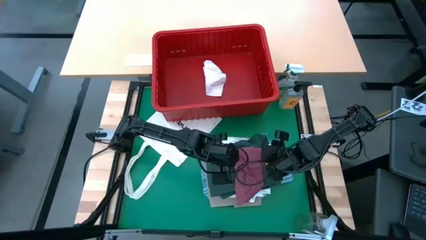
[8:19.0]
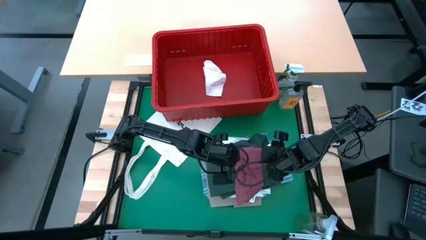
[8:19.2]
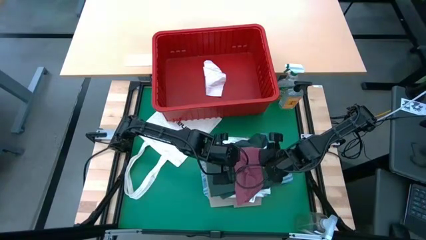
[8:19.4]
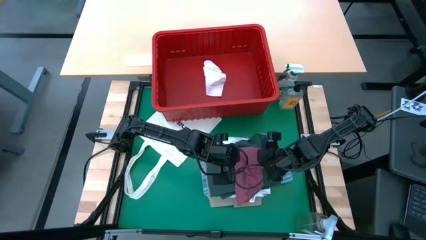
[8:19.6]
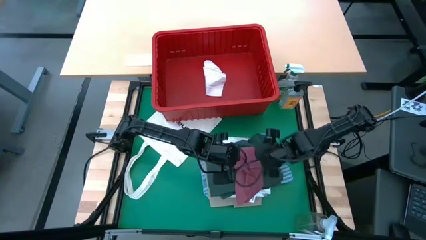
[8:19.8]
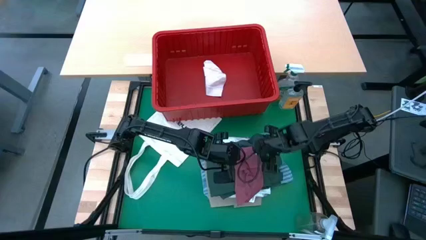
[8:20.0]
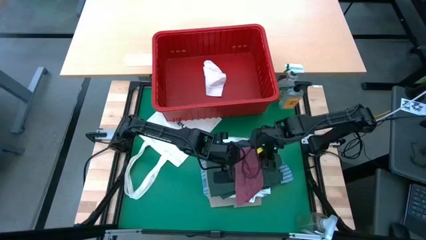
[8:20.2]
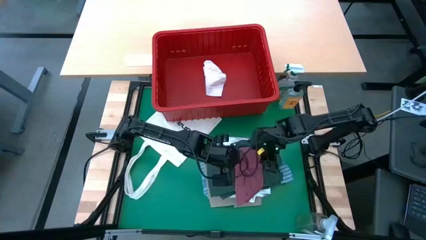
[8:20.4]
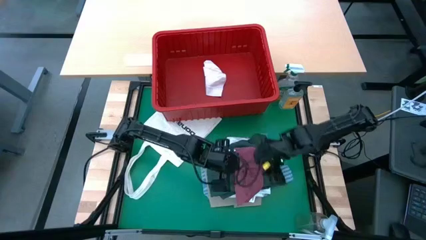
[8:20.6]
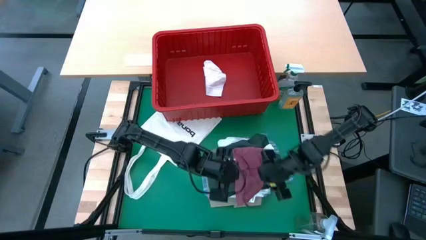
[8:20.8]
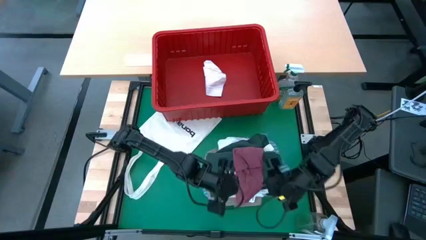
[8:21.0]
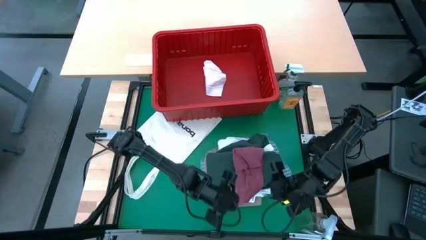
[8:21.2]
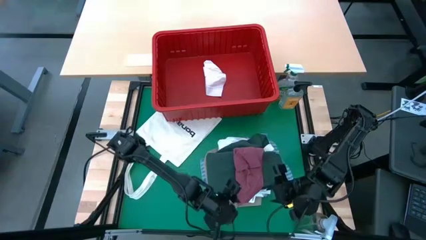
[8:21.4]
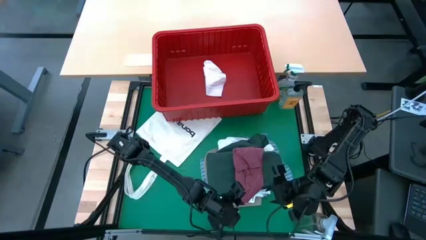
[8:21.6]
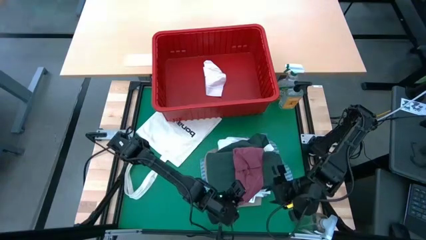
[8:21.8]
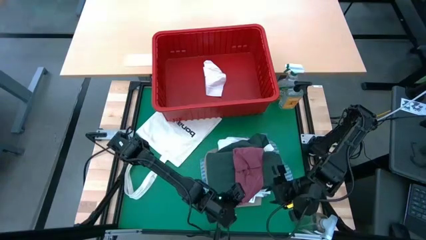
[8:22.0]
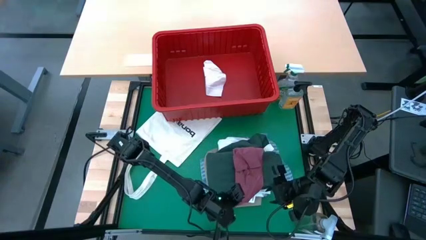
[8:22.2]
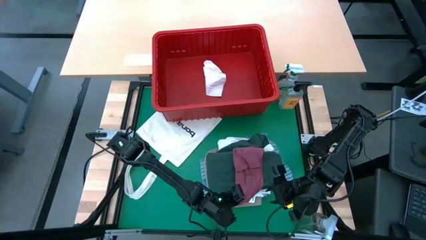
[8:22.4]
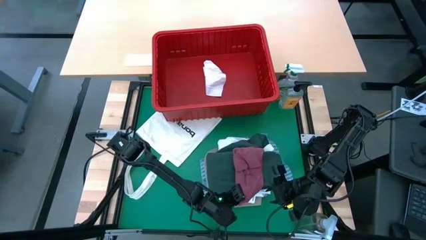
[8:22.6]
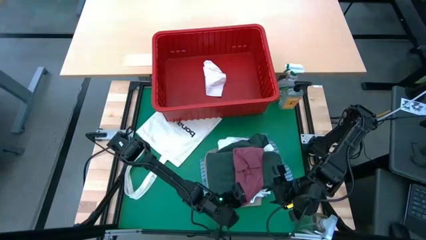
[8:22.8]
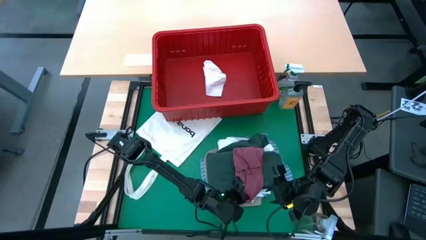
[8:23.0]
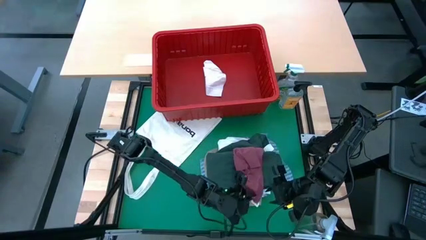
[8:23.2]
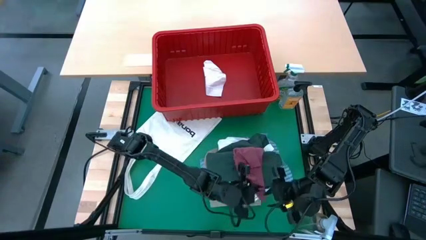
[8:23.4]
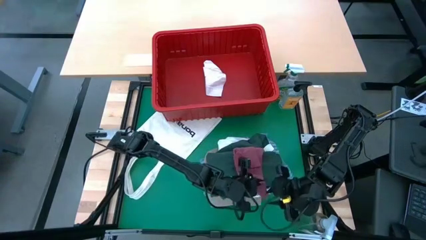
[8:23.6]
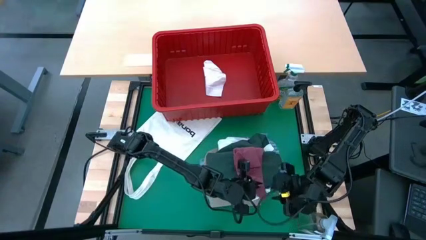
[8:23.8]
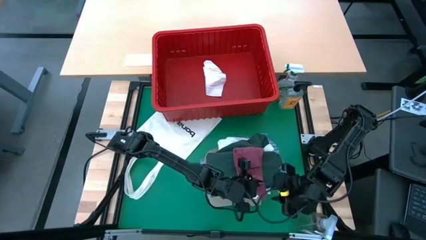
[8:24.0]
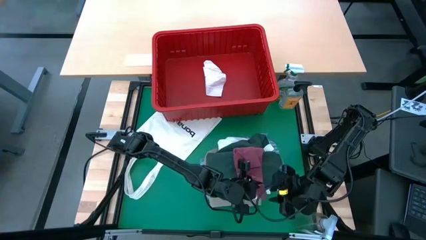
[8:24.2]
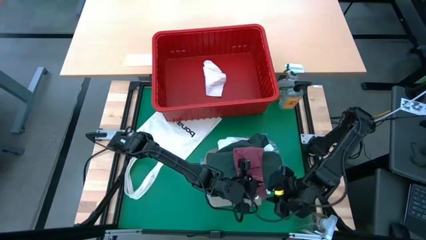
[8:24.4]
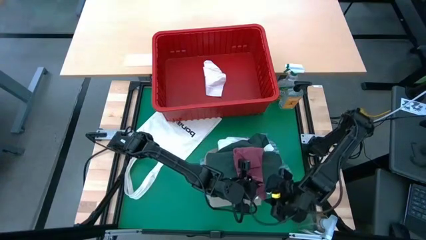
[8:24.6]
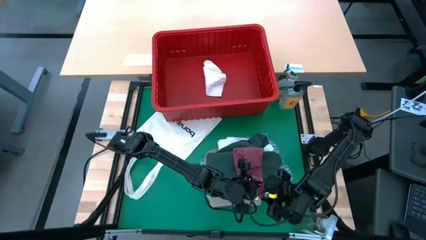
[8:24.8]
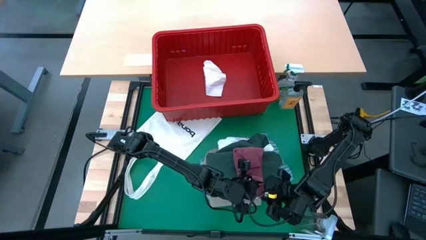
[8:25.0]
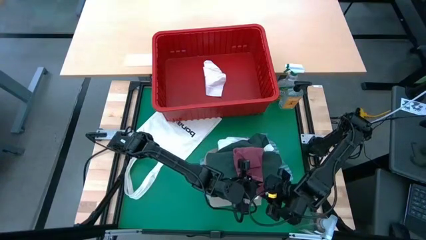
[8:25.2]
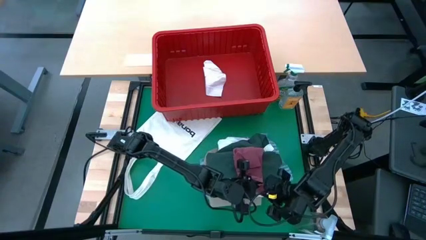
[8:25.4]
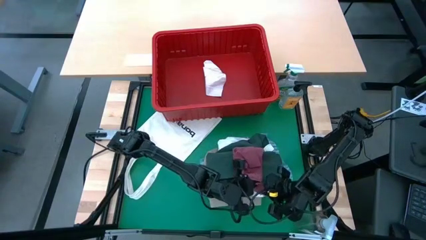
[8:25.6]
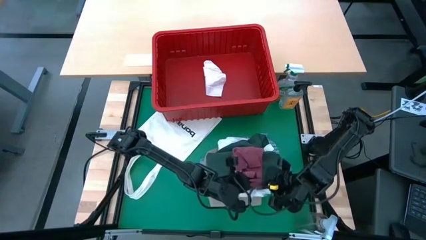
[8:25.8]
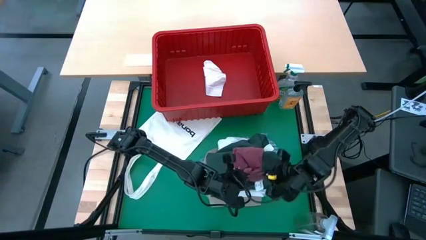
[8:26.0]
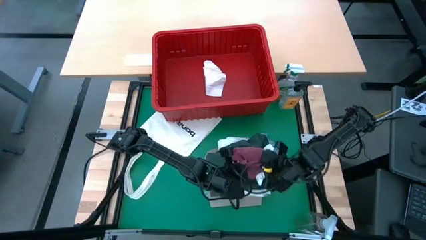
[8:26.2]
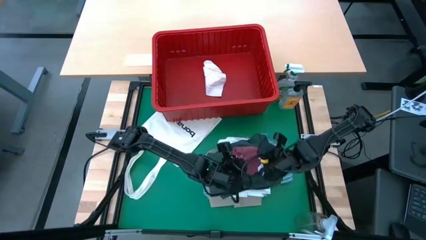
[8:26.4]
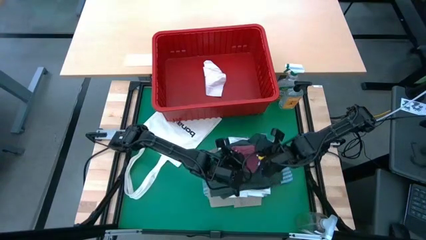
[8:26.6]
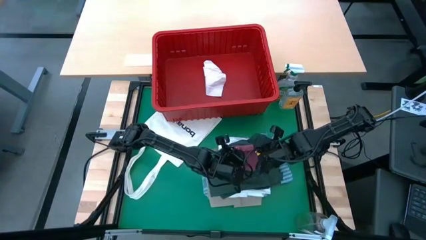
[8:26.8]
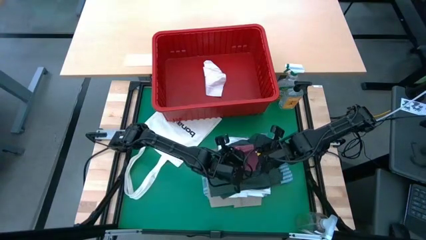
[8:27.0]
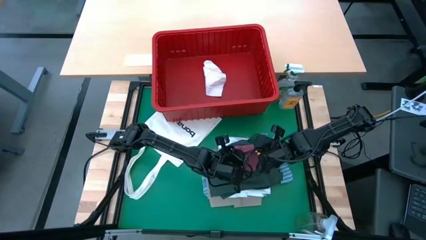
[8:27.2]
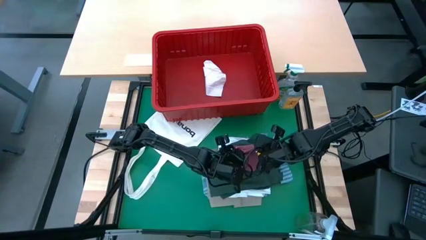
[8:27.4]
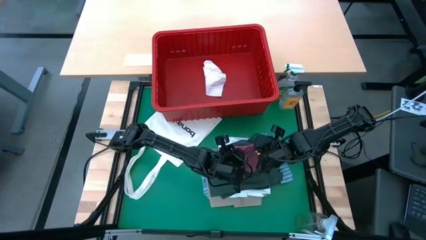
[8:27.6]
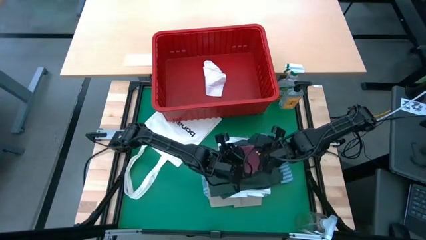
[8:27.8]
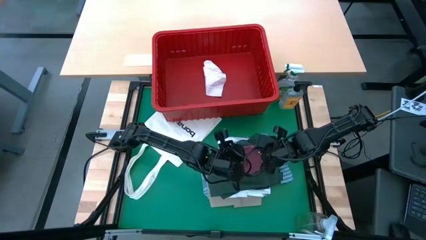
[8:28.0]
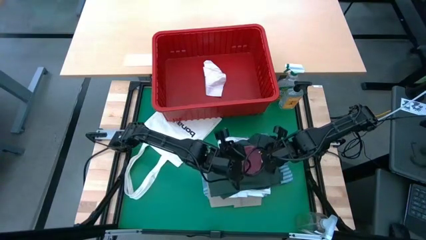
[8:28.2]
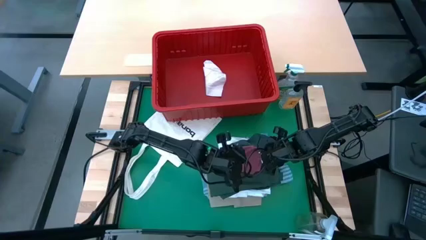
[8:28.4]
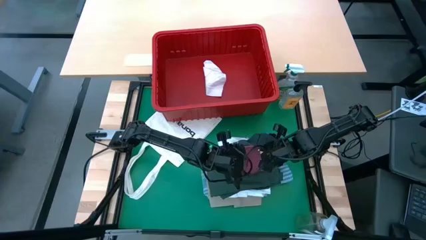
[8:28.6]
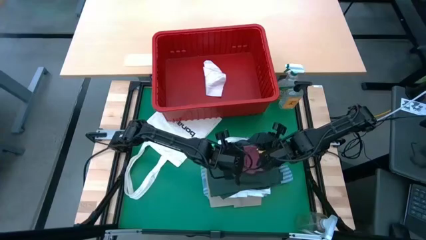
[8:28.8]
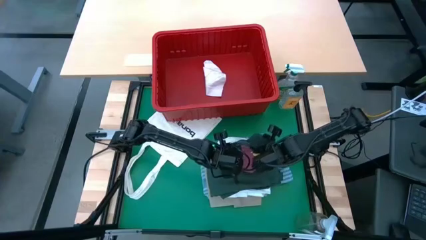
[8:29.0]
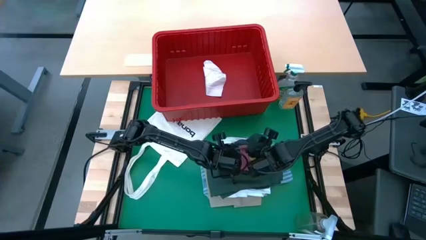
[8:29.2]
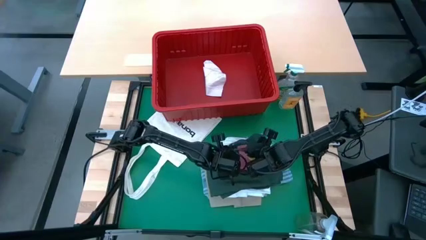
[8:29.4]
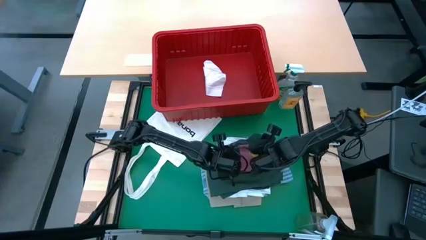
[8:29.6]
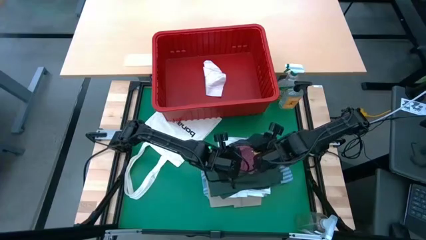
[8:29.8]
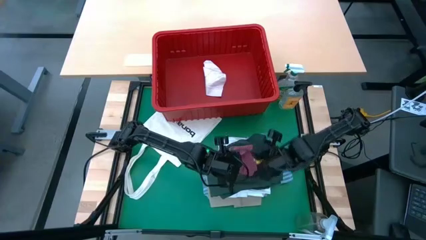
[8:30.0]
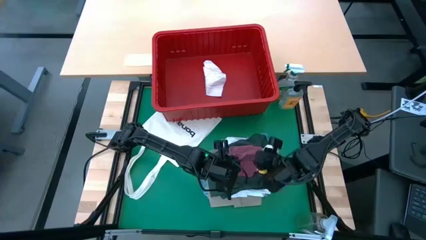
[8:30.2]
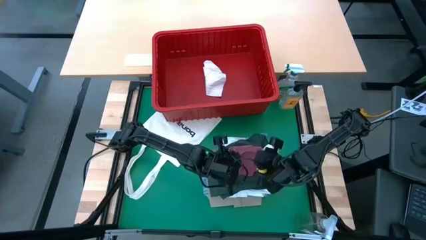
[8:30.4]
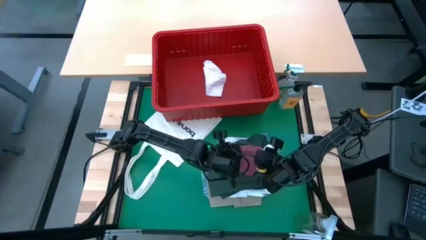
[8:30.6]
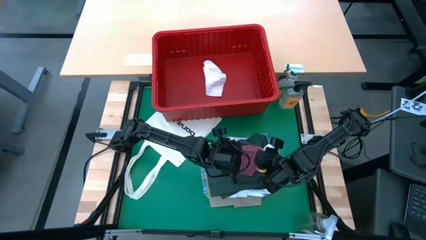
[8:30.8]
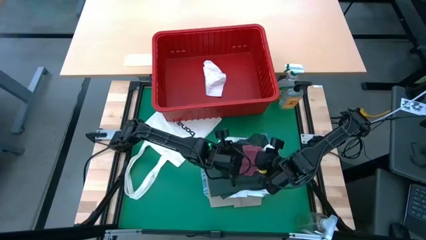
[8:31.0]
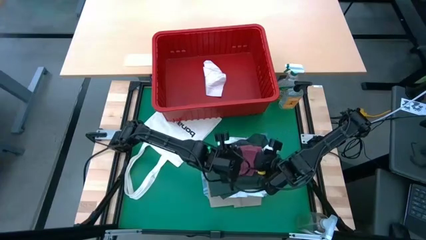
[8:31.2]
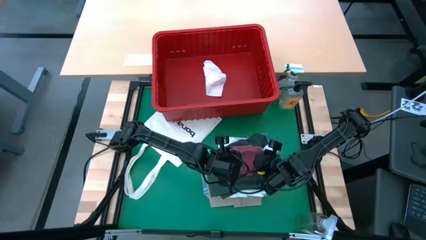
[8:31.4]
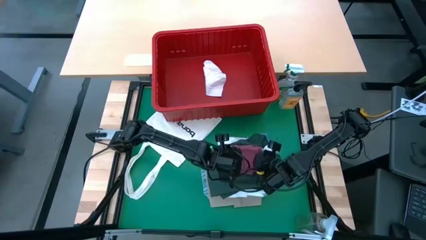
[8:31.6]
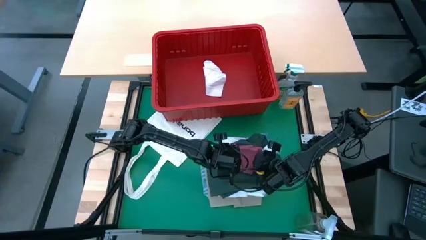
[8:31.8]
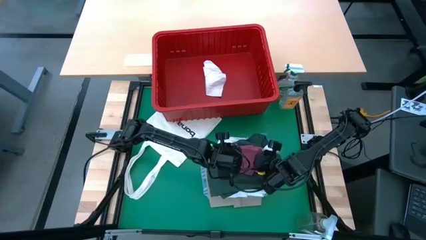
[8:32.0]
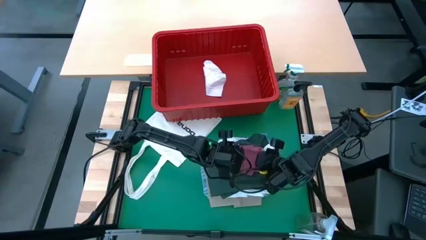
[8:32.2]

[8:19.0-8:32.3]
Task: Fold Laundry from Bin
Fold the pink underwear
